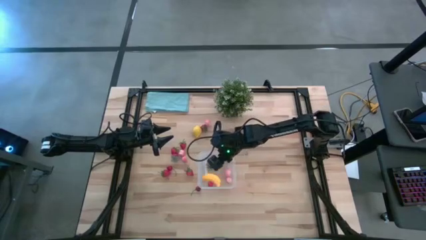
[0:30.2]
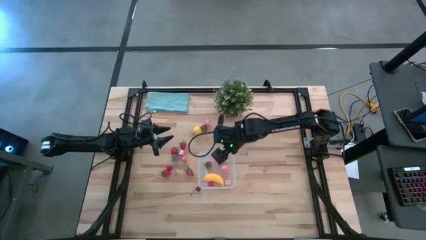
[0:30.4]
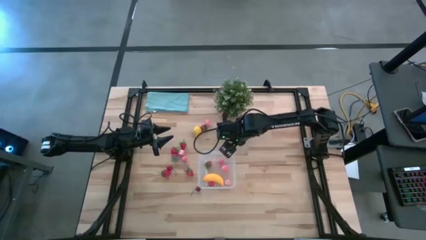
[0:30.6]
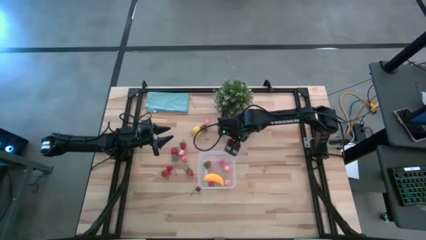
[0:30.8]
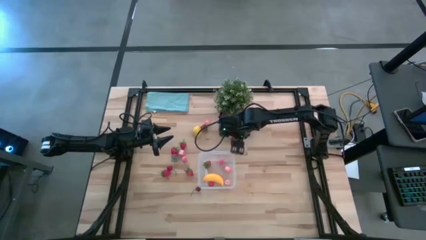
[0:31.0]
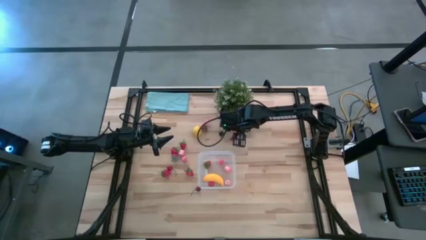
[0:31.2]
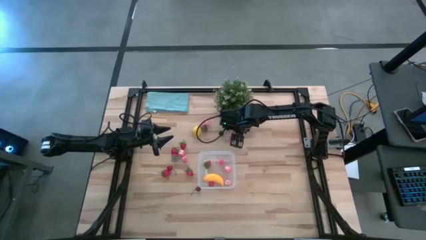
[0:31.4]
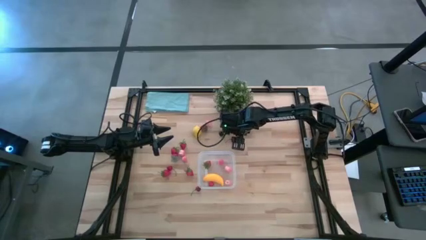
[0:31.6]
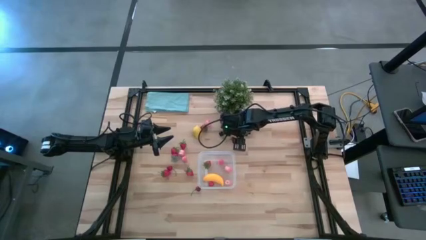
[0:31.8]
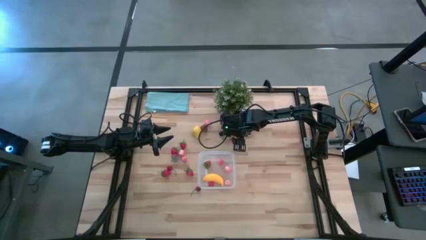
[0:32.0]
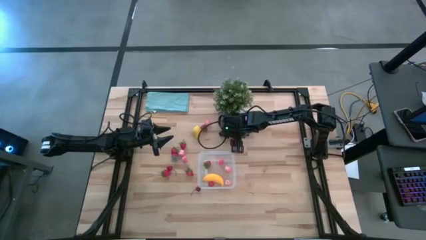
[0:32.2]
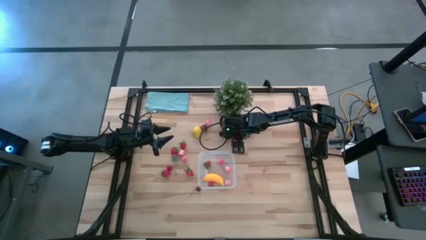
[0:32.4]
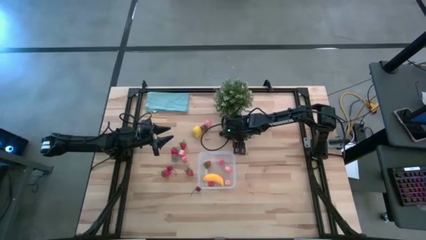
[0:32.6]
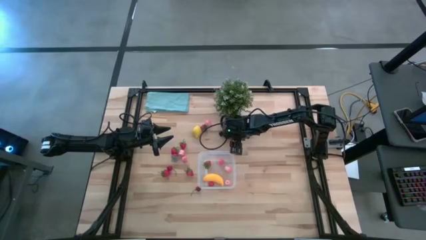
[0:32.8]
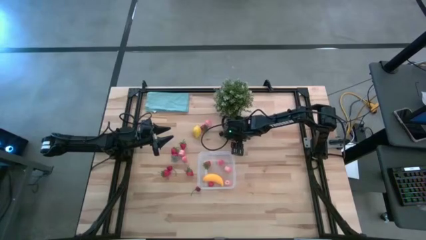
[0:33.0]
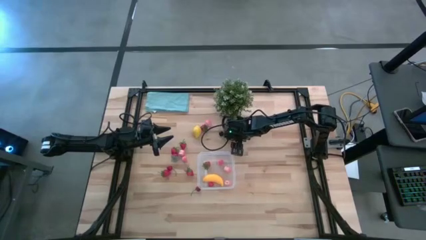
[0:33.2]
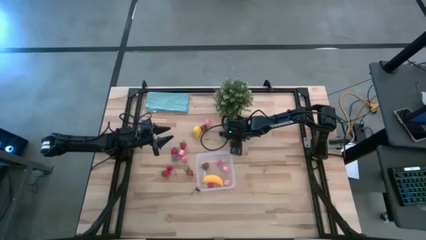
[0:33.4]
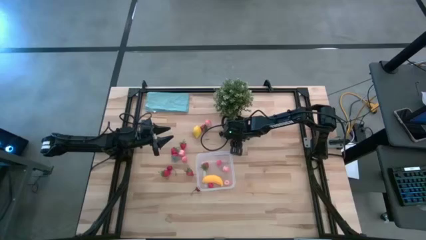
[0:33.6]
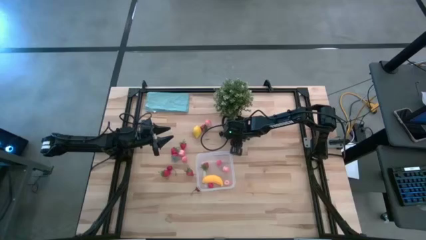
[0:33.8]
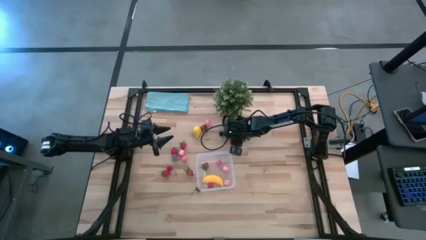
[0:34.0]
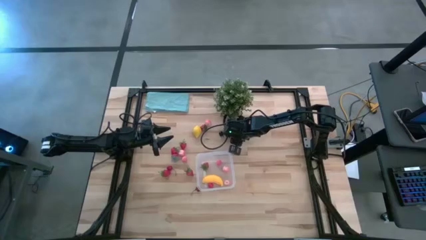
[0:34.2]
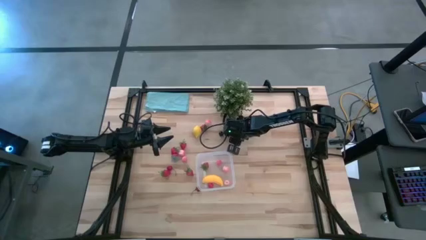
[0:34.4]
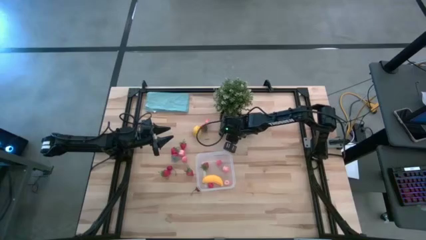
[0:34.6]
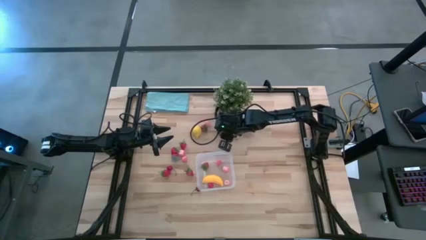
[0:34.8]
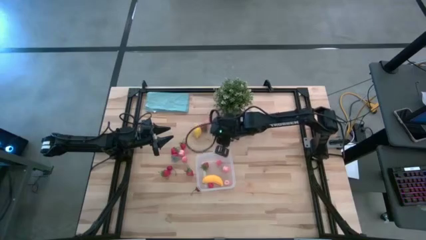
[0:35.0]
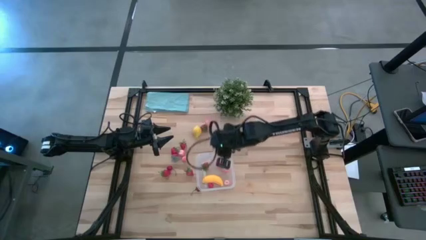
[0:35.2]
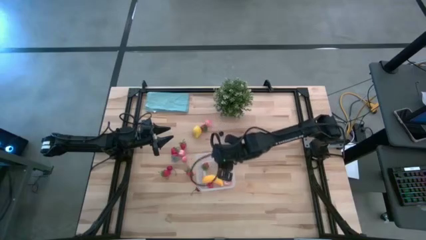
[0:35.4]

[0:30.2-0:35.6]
Task: Pick and placing Produce into tupperware
Put the red cherry into the transparent bin

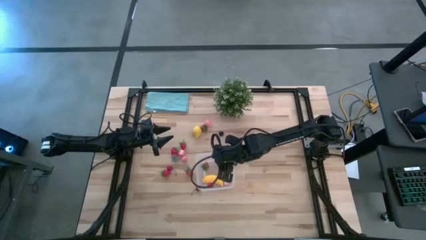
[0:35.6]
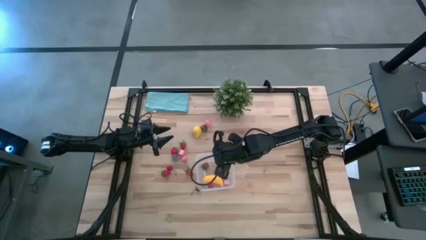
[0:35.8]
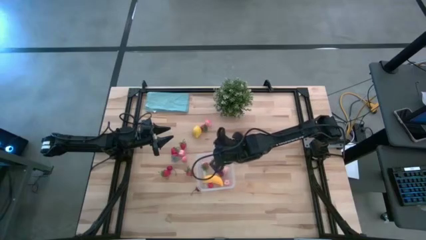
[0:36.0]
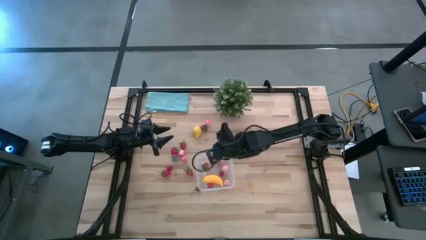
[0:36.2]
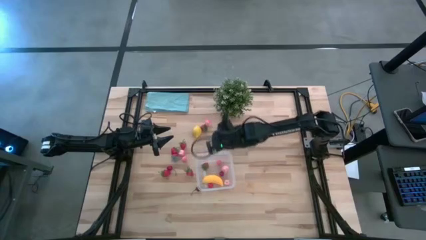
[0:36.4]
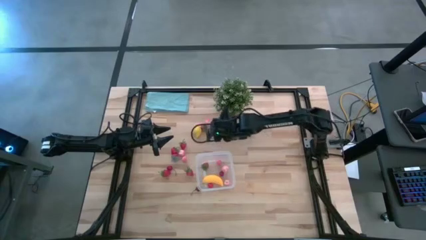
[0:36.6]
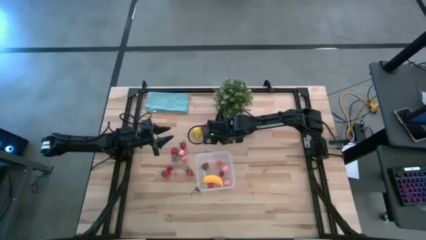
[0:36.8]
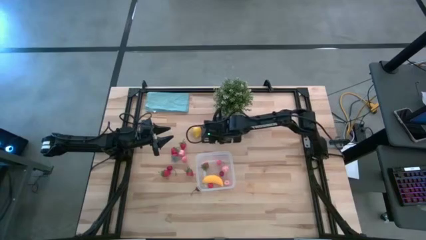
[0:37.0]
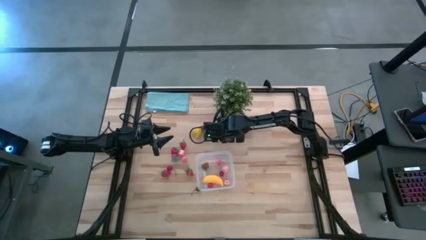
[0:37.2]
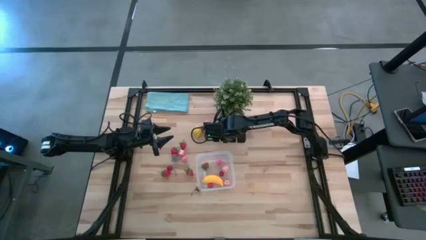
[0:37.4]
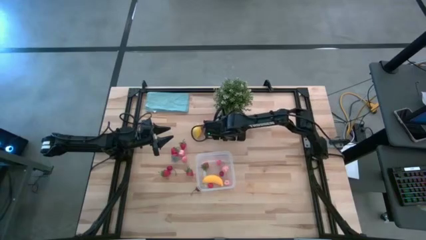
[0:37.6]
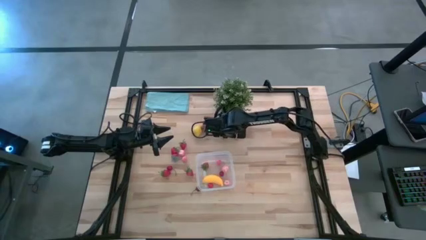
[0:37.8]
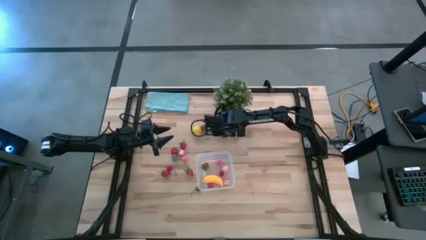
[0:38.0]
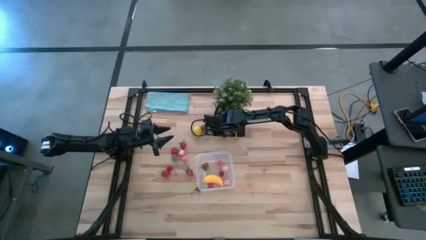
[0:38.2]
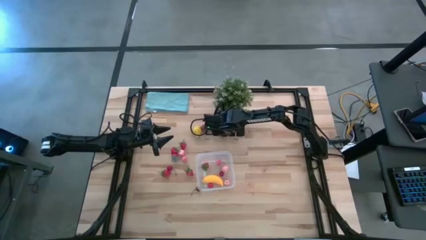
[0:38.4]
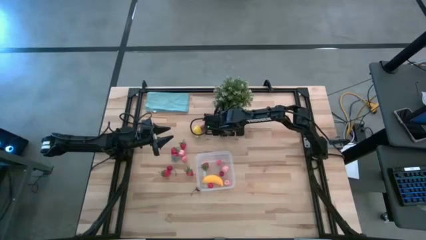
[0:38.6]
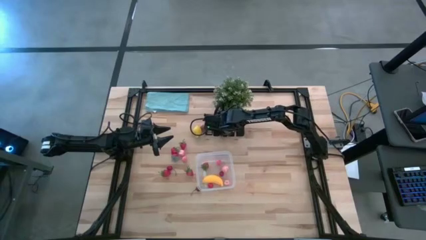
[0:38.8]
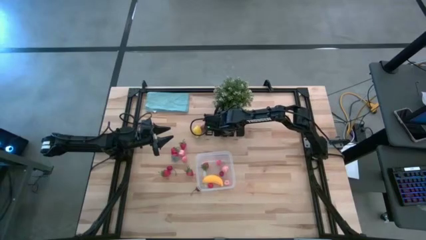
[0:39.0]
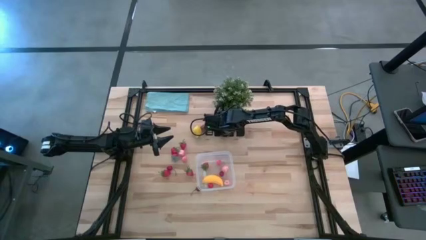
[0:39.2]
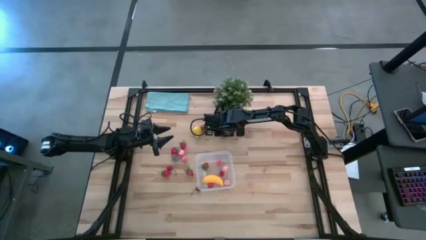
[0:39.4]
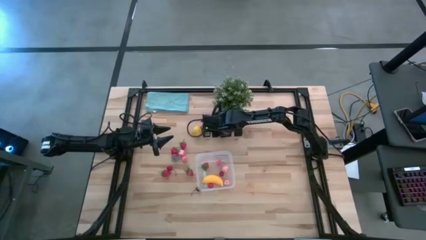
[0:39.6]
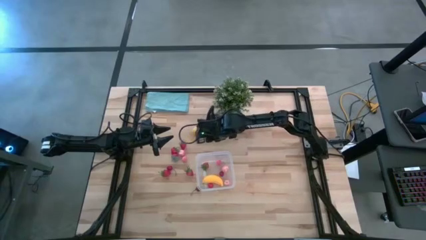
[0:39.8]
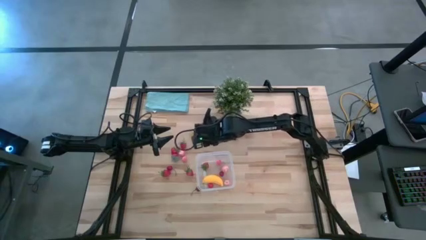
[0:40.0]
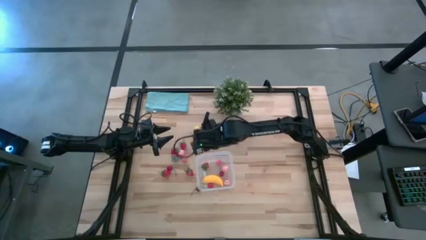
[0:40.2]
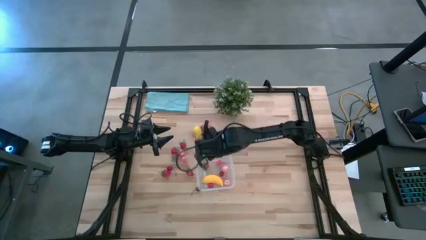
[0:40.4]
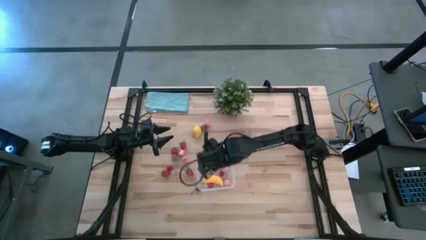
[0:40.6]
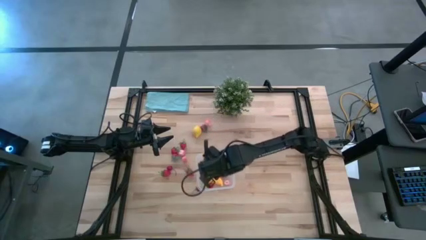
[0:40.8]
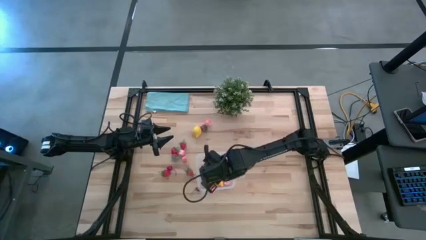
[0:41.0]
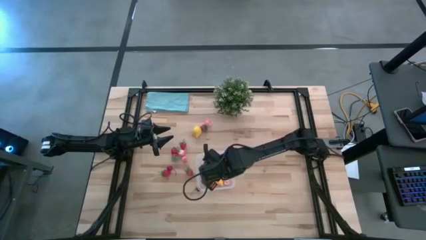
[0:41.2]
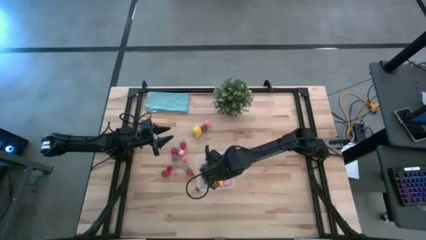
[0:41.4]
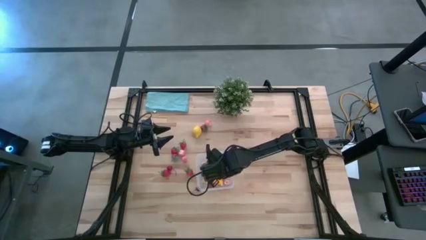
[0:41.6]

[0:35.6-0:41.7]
Put the black plum into the transparent bin

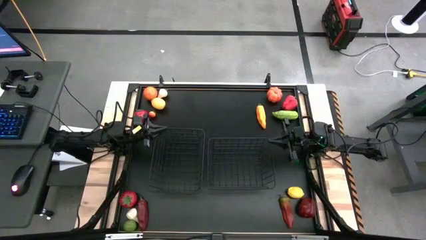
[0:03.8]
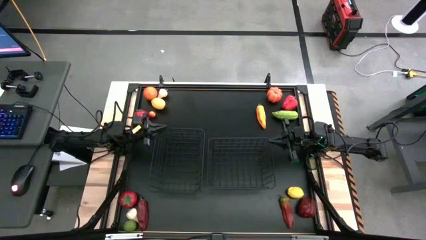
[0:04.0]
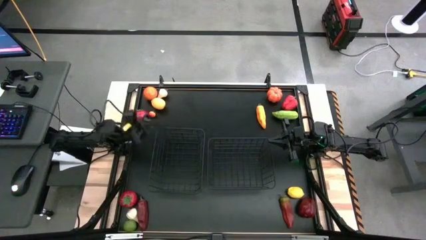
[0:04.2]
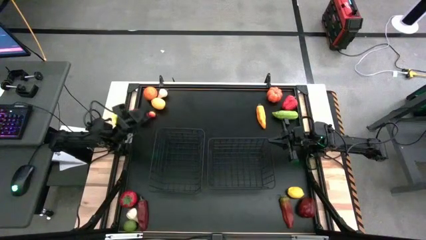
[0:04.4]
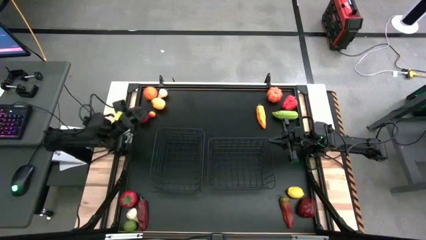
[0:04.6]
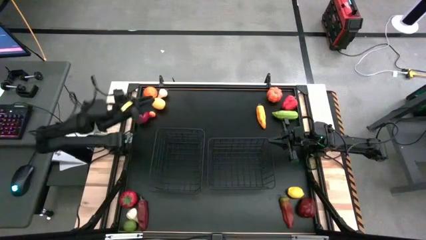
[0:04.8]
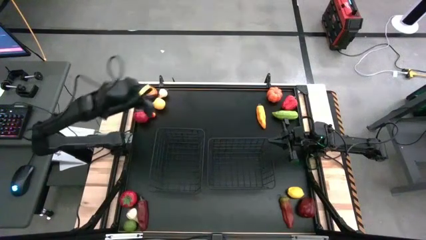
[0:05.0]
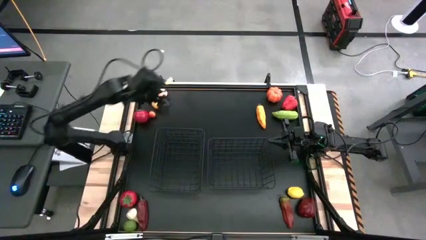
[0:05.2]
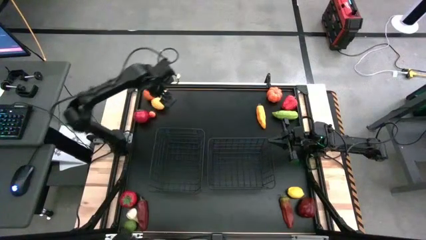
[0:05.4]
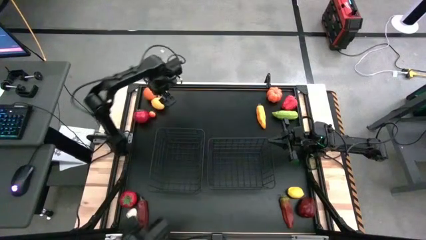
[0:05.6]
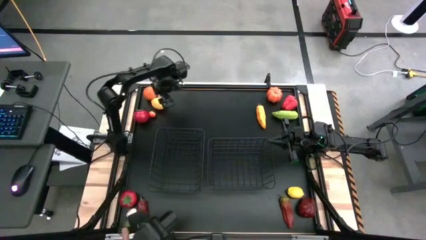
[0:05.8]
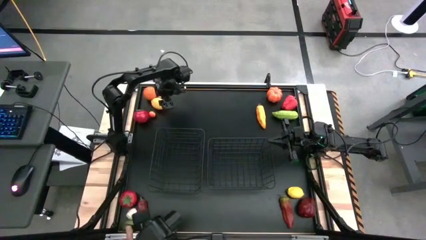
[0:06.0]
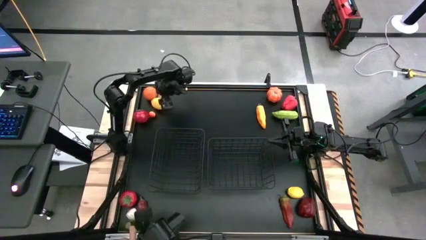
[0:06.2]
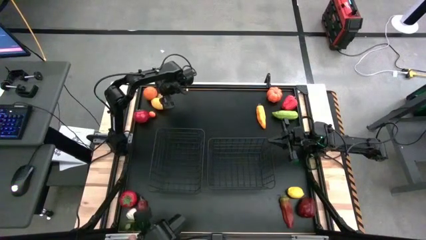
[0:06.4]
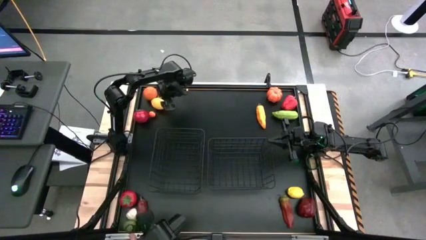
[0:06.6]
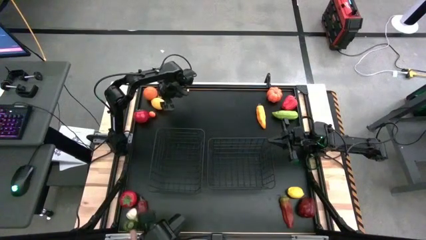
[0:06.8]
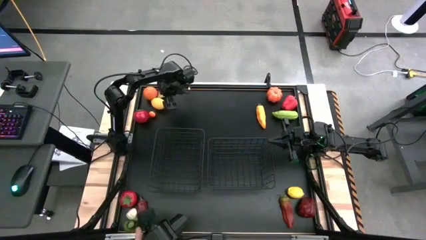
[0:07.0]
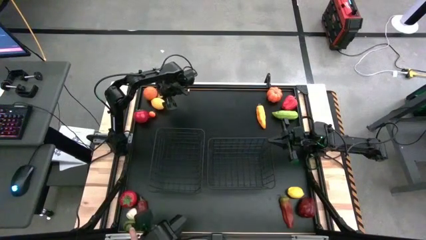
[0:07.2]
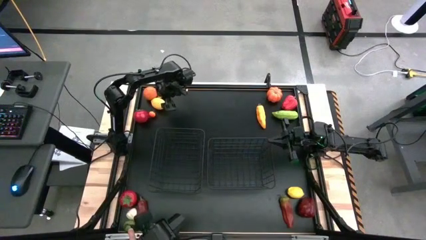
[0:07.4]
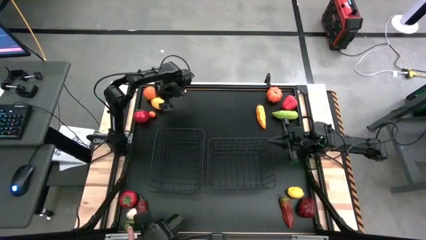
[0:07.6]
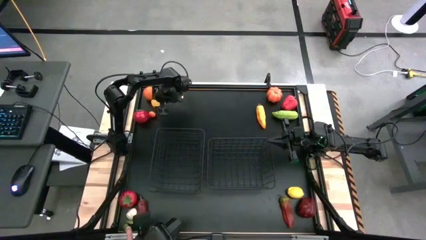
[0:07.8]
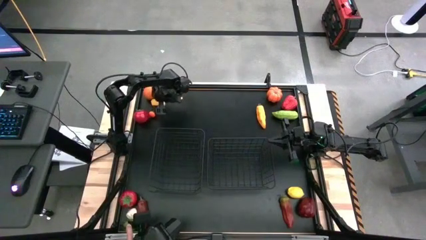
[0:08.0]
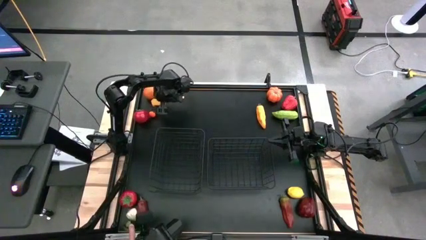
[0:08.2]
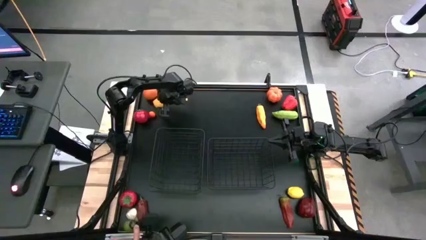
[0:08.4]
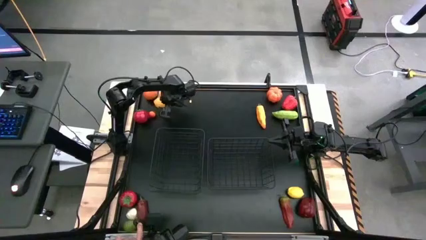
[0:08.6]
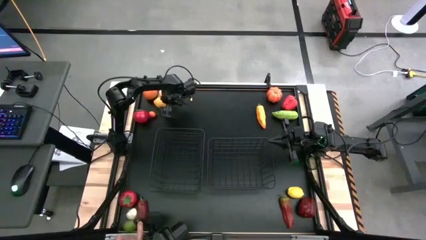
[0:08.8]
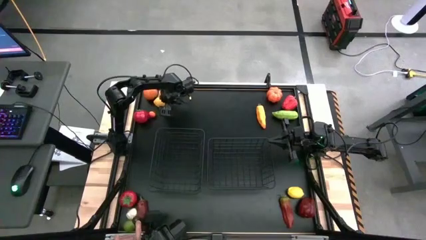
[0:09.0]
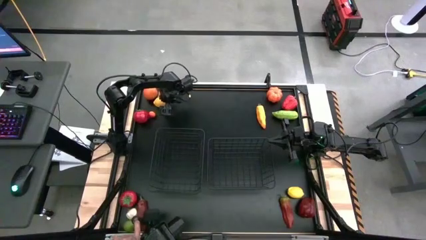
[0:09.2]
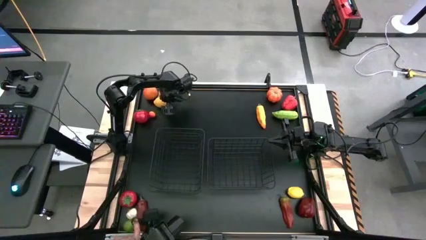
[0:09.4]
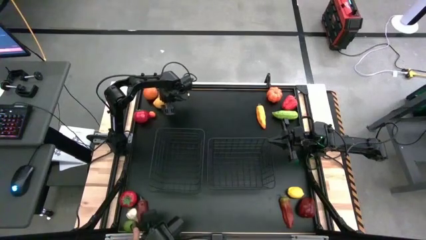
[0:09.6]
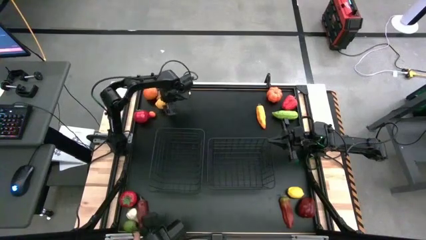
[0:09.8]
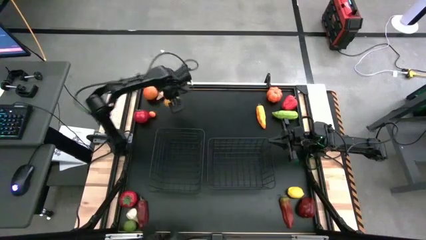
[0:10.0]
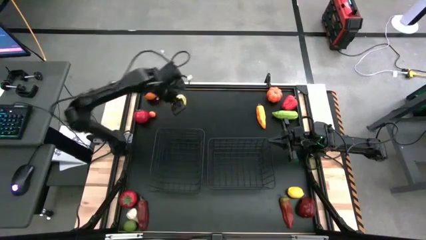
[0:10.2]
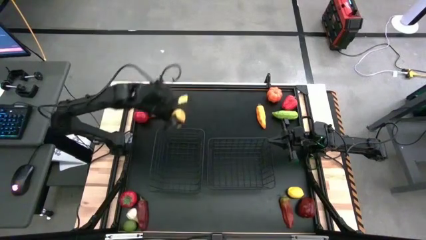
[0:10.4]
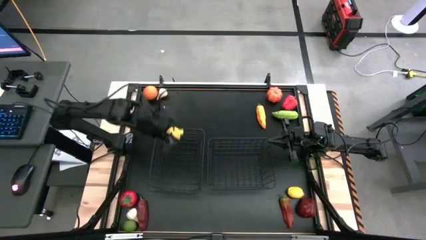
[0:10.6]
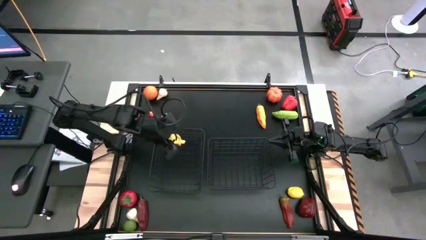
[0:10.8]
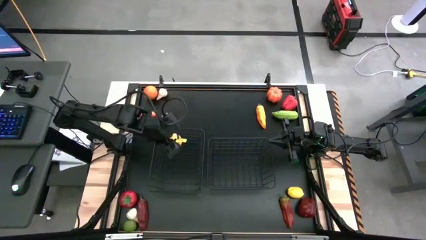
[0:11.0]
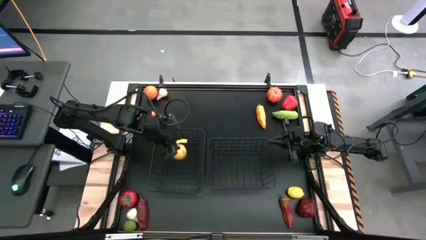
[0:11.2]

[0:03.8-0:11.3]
Task: Sort produce into baskets
Put the top yellow lemon into the left wire basket
